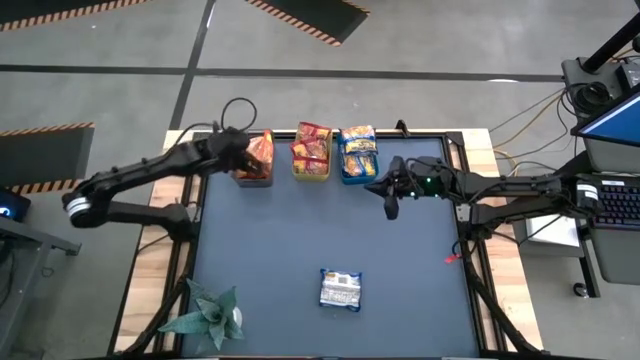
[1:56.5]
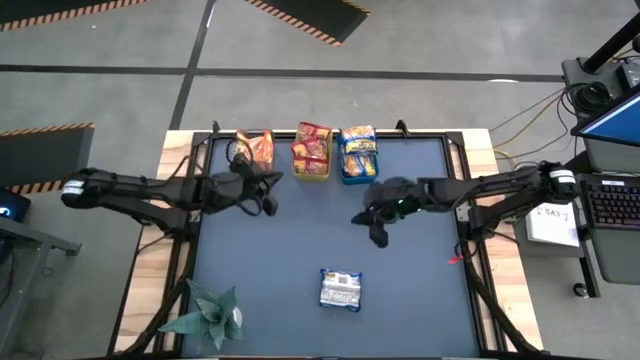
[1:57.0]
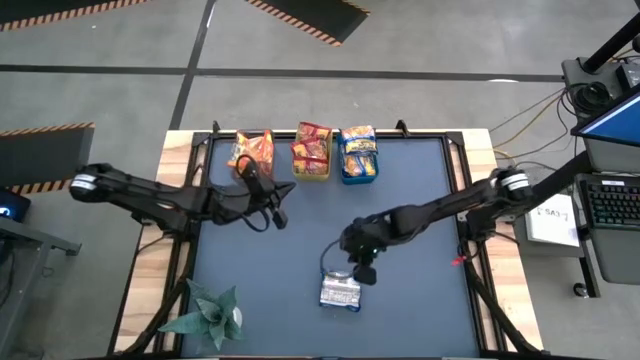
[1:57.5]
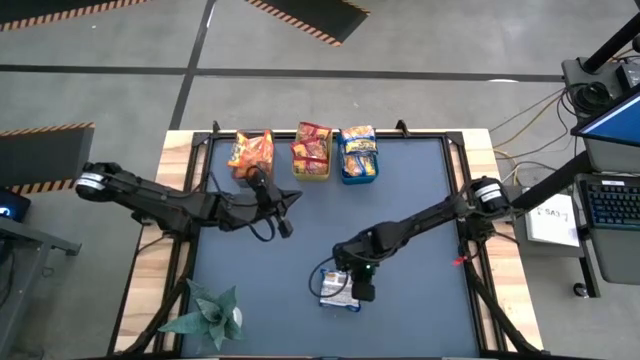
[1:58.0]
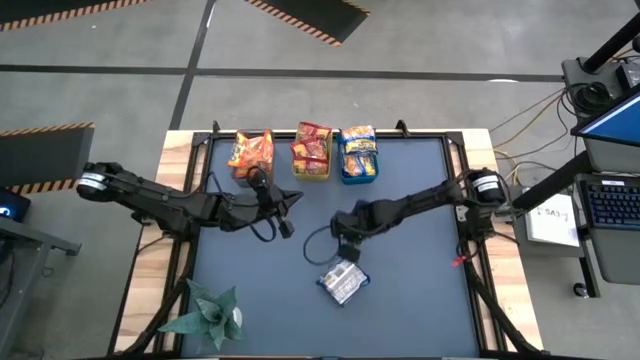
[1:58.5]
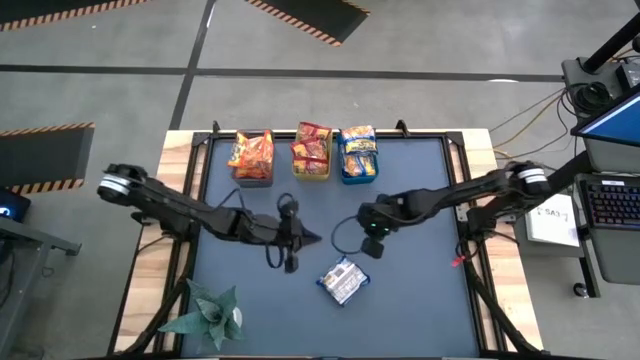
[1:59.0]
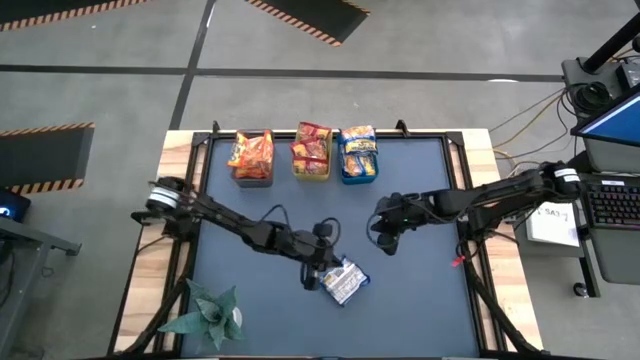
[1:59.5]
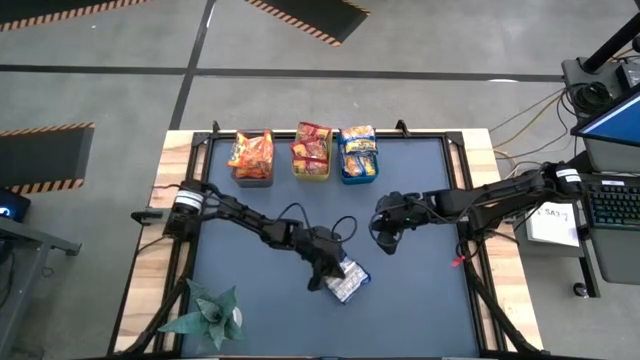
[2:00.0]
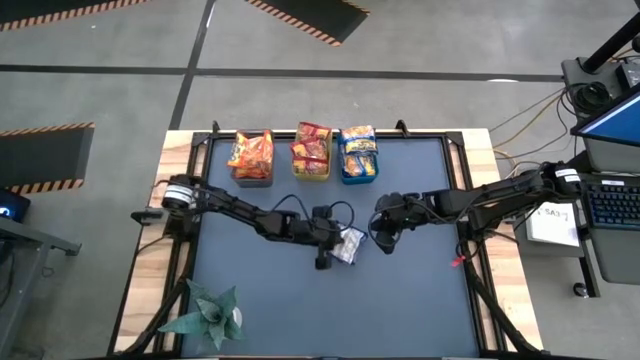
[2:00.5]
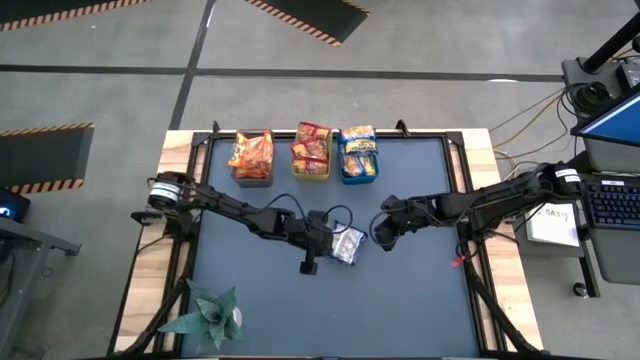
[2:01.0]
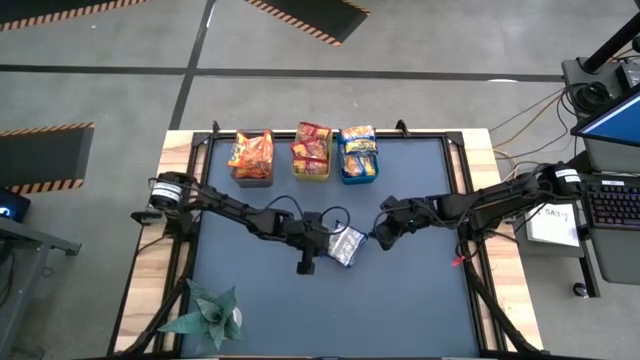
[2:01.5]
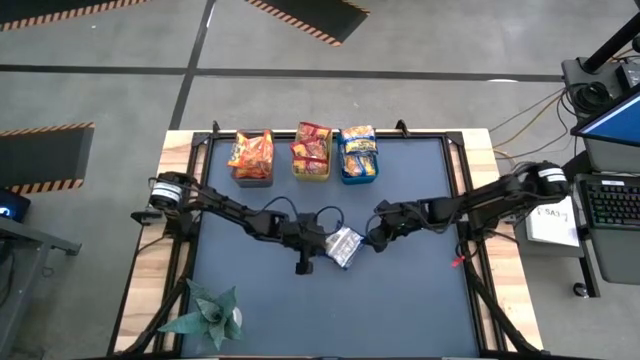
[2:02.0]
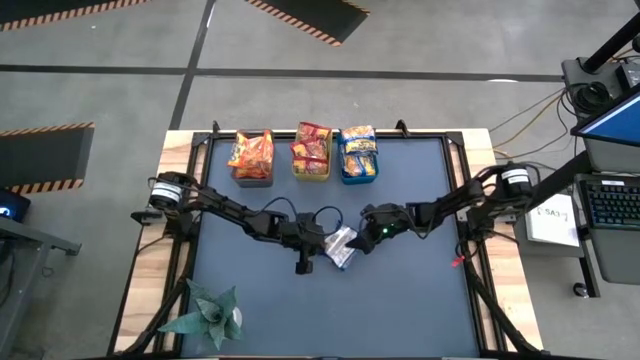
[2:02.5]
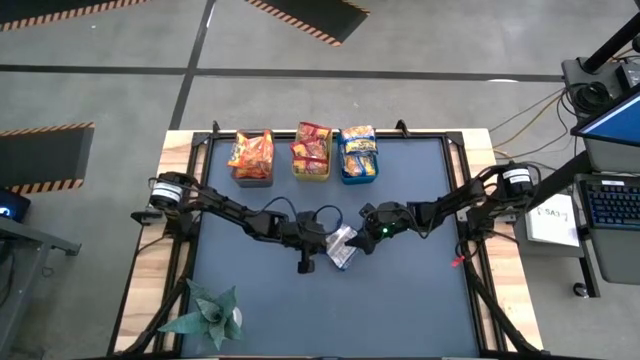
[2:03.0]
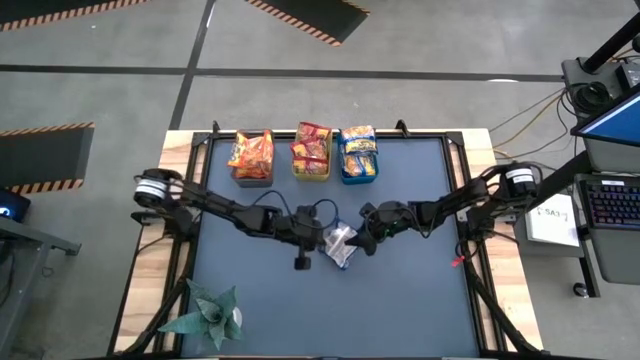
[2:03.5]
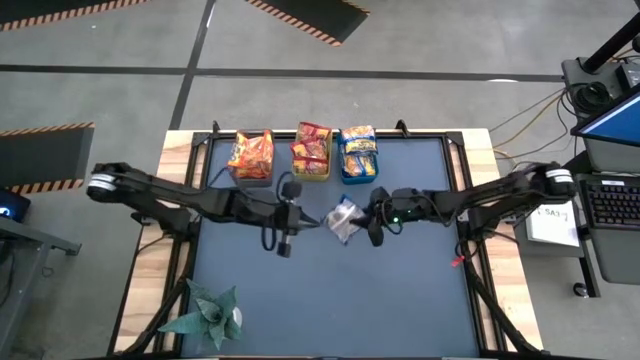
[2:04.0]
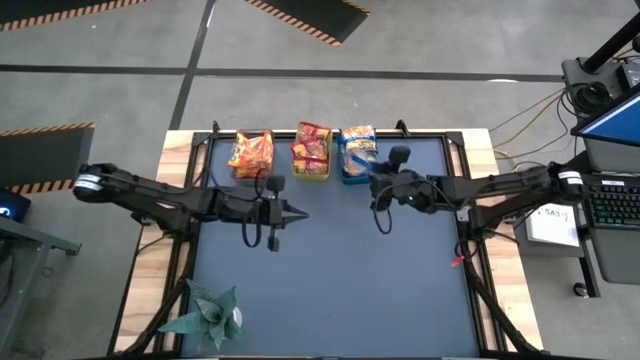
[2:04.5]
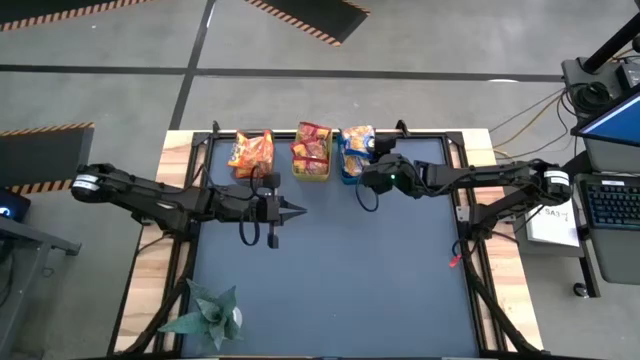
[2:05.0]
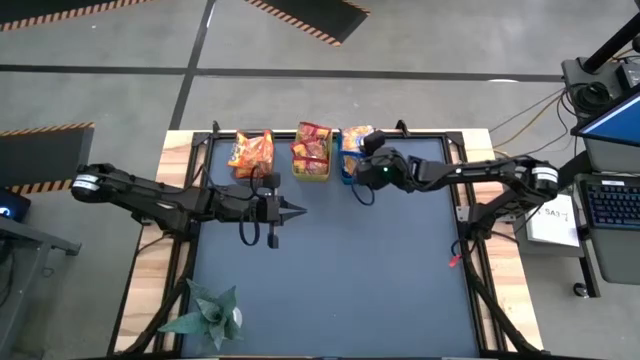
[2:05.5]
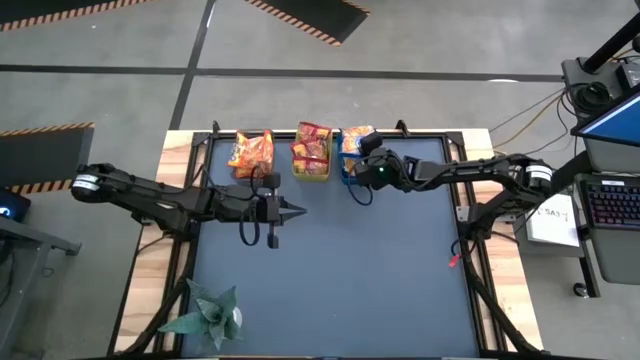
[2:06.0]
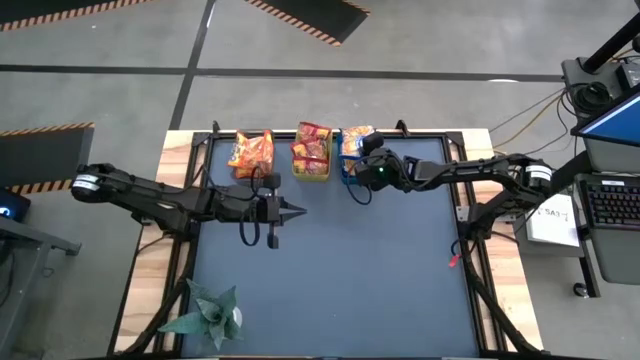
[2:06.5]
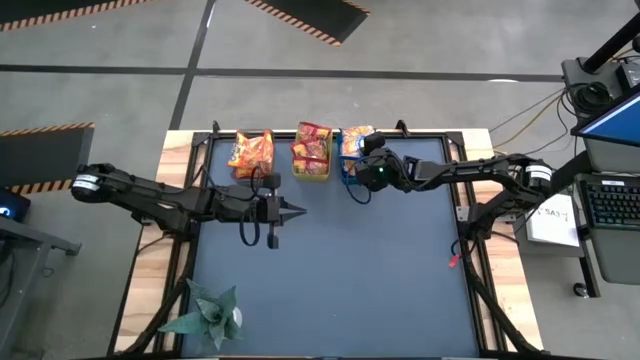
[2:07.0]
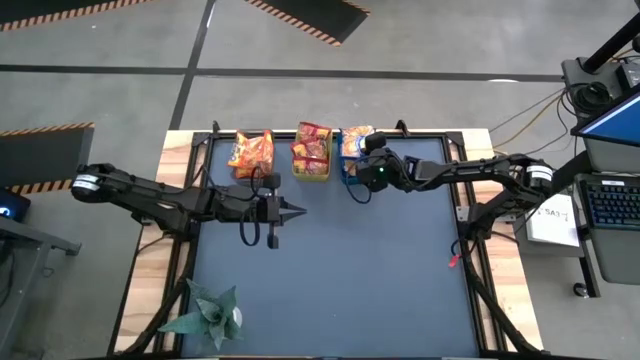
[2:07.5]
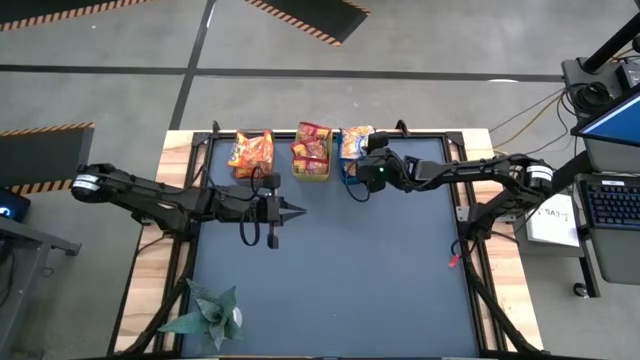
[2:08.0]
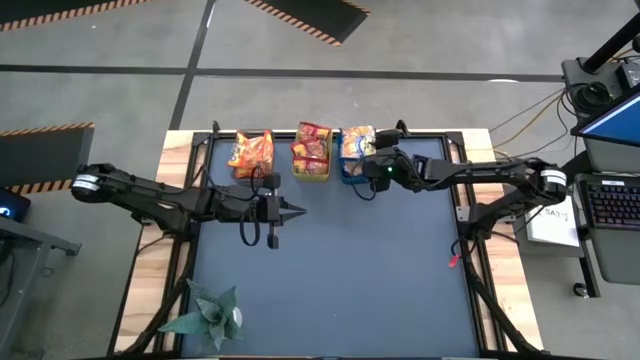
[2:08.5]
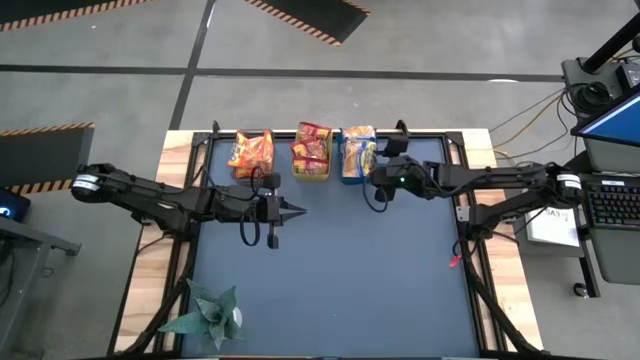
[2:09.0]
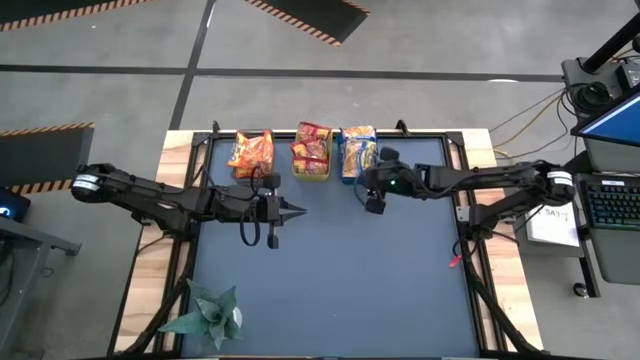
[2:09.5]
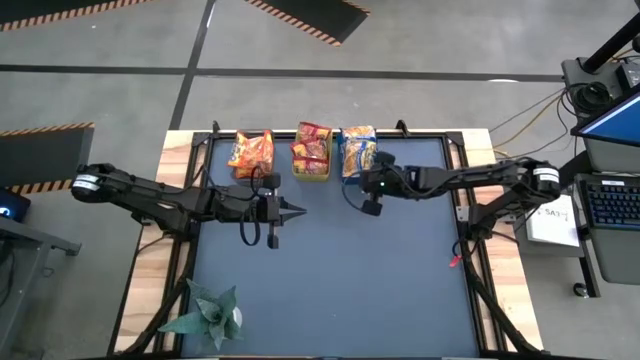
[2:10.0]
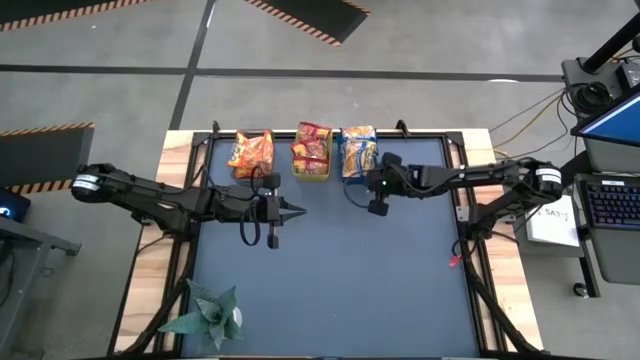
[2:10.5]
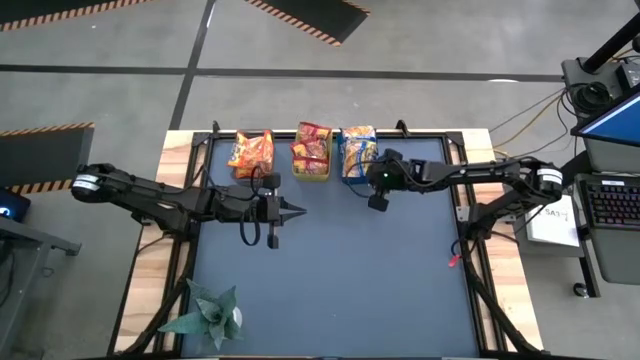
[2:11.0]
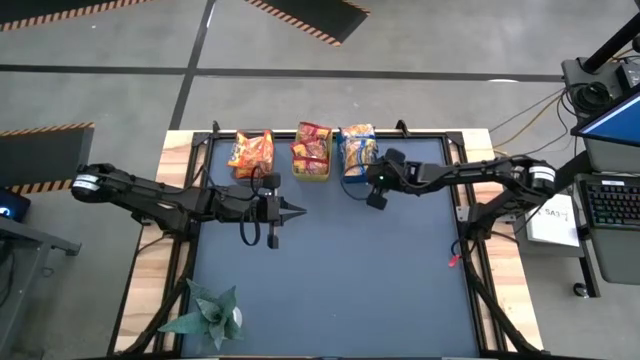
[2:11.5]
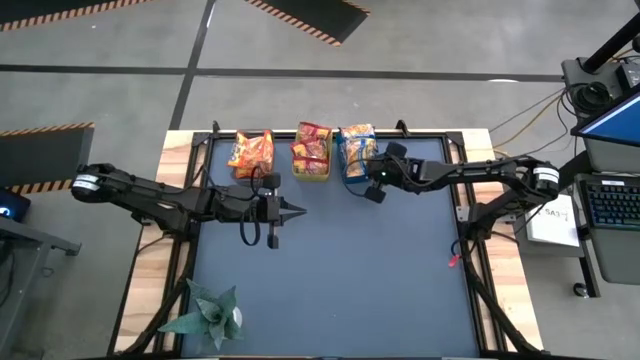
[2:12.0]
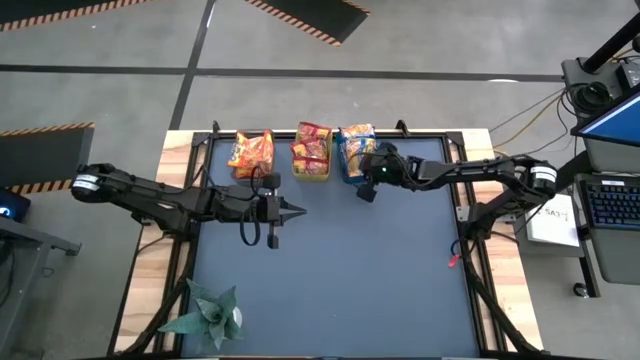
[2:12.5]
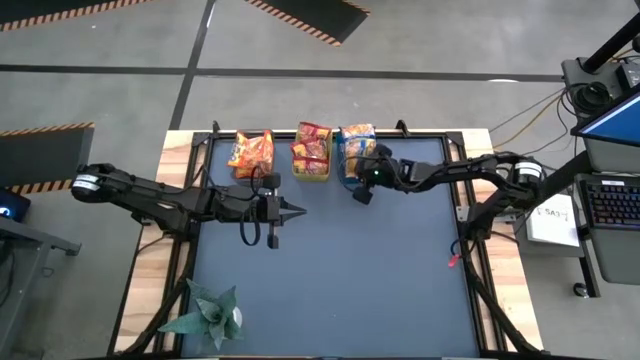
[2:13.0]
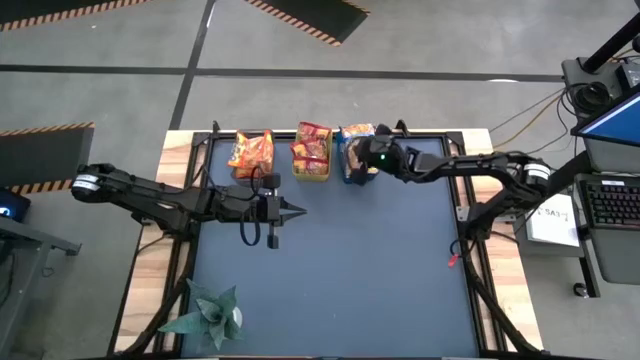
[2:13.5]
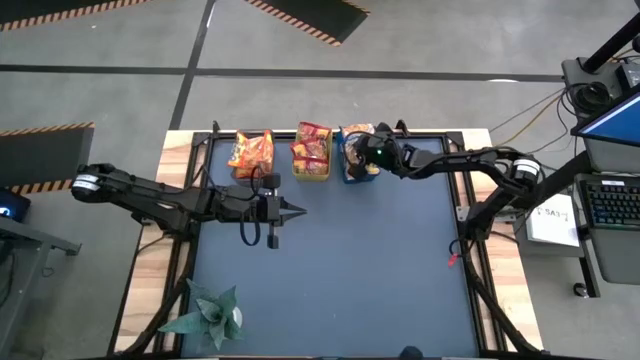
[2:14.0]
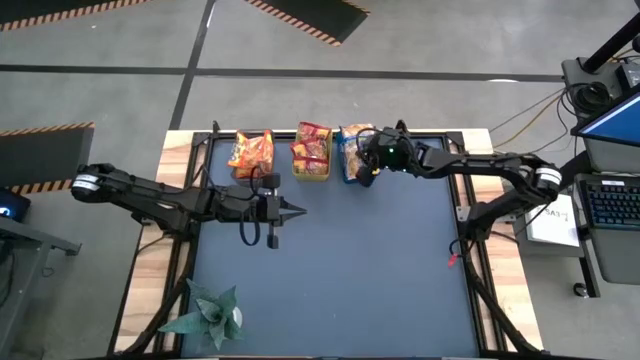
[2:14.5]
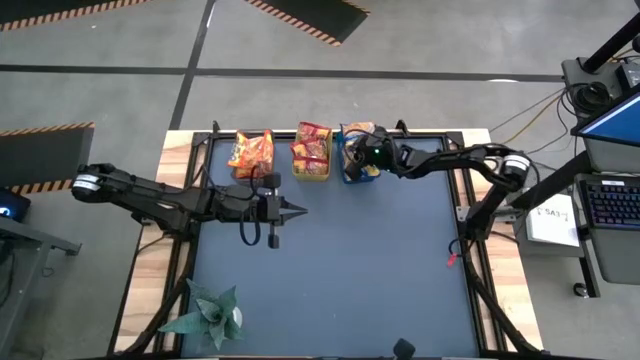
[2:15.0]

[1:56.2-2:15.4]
Task: Sort Maruchan noodles
Put the blue noodle pack into the blue bin

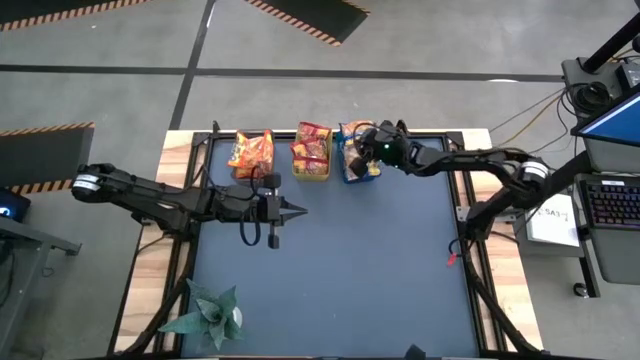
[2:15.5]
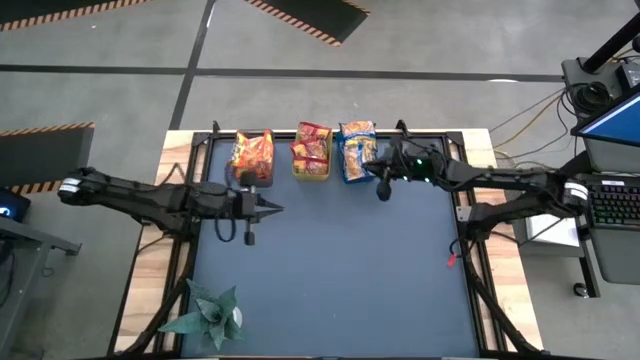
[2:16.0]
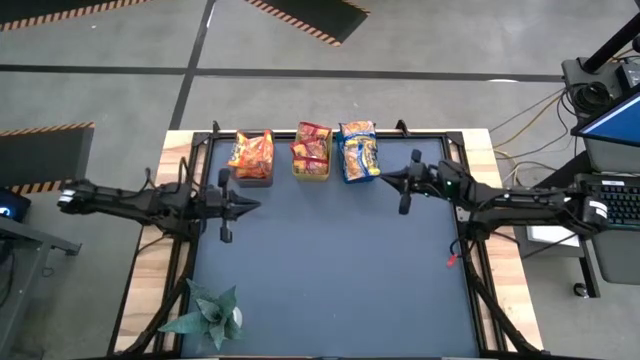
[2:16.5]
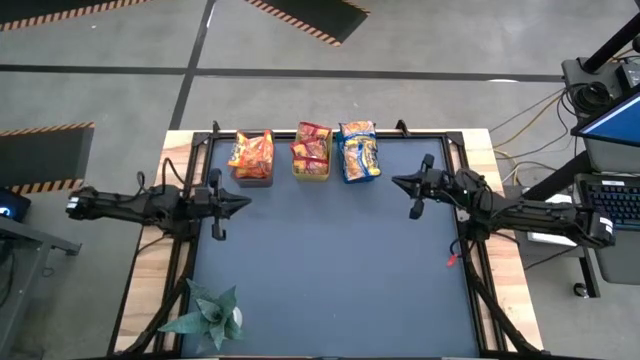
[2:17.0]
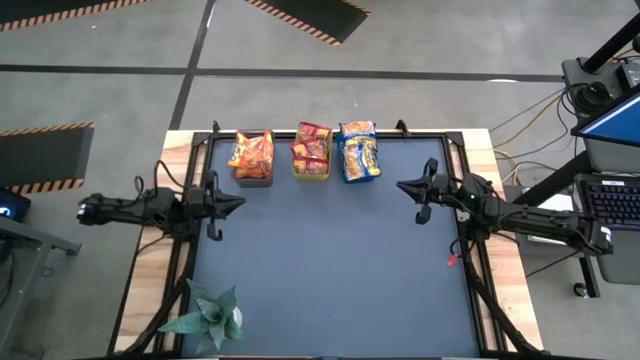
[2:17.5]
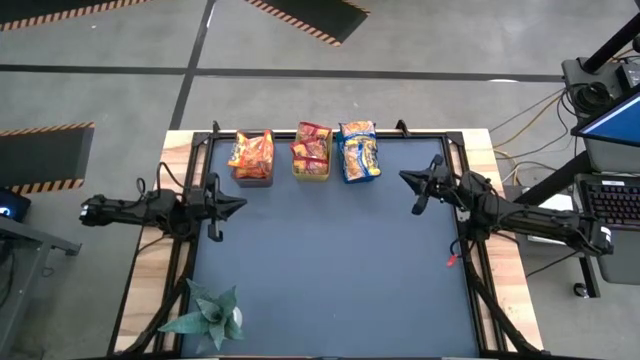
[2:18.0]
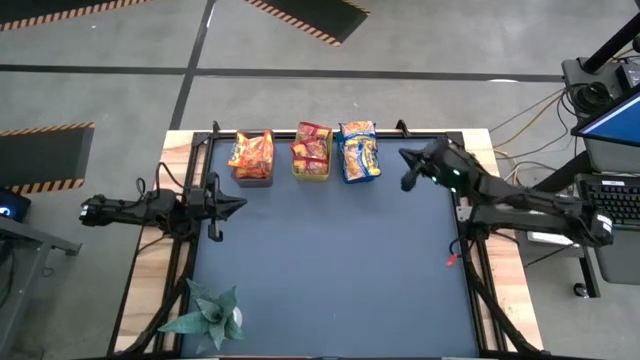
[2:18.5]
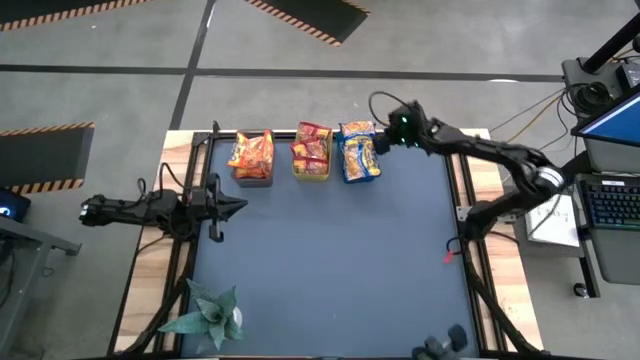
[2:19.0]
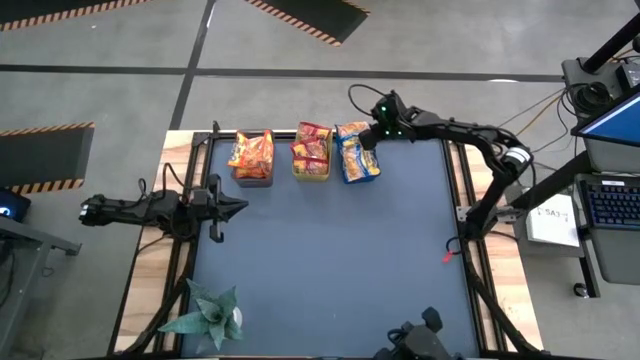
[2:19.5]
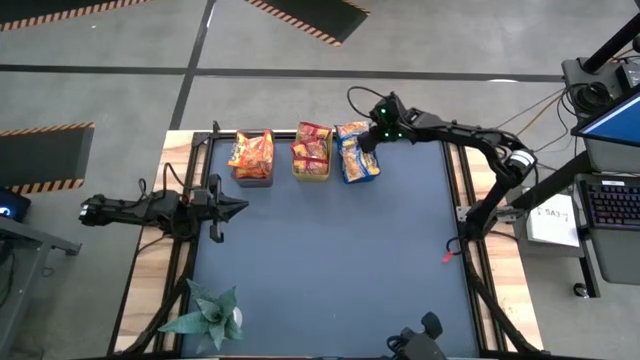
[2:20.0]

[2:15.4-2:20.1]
Adjust the blue noodle pack
